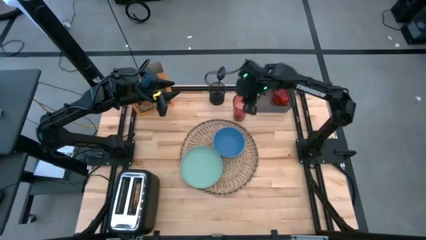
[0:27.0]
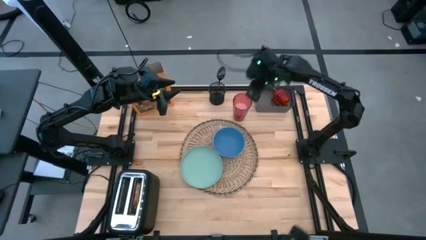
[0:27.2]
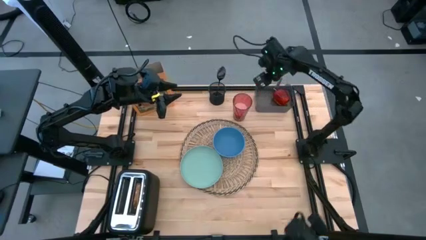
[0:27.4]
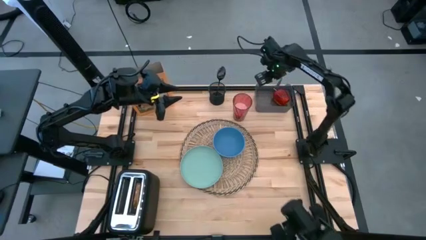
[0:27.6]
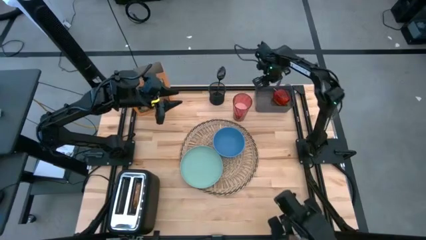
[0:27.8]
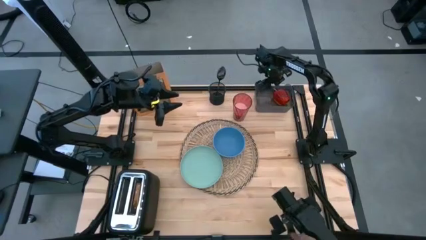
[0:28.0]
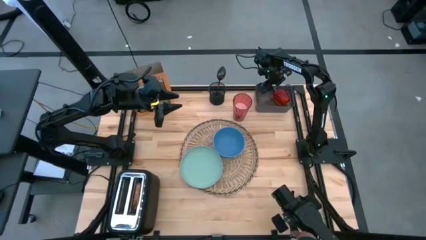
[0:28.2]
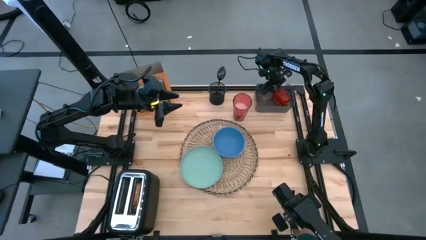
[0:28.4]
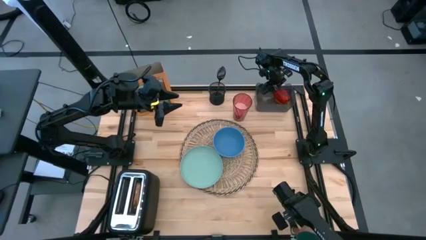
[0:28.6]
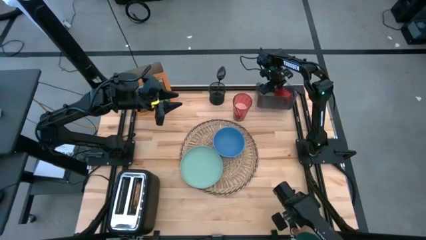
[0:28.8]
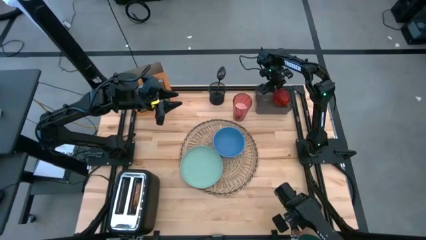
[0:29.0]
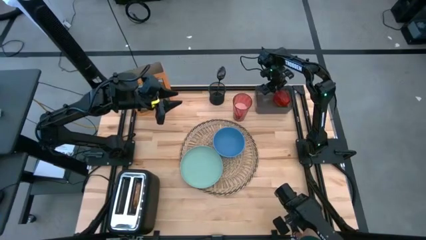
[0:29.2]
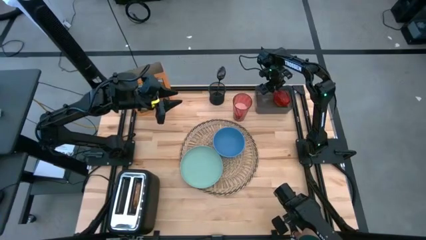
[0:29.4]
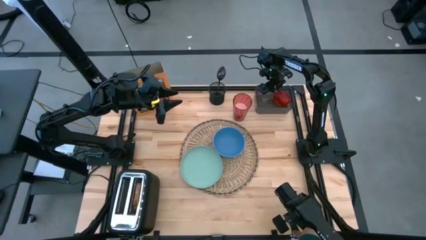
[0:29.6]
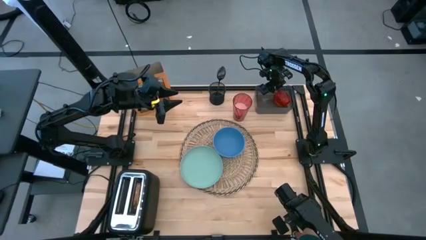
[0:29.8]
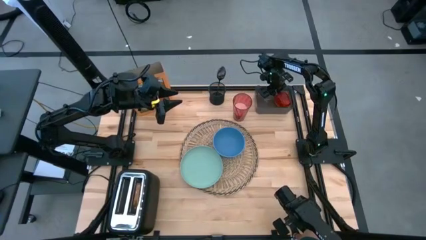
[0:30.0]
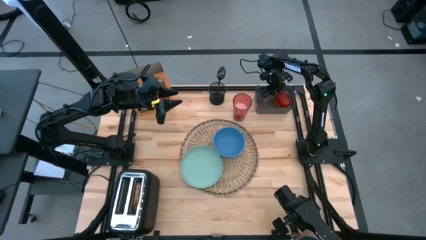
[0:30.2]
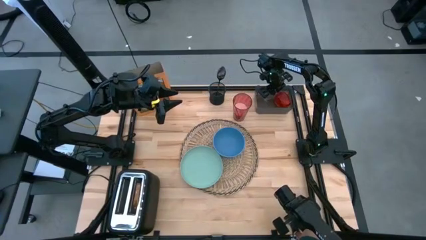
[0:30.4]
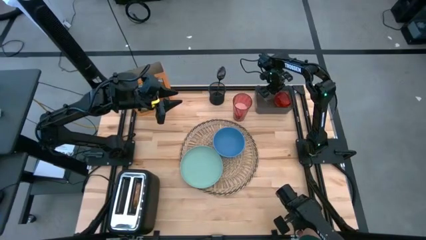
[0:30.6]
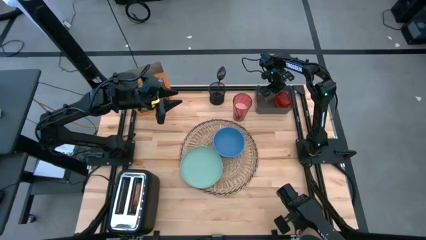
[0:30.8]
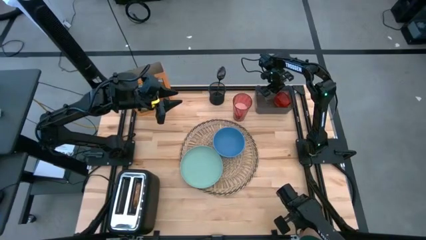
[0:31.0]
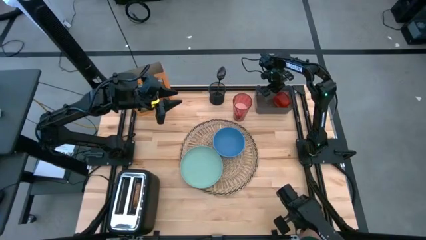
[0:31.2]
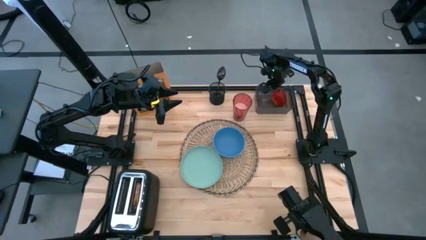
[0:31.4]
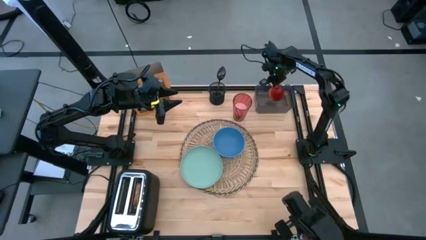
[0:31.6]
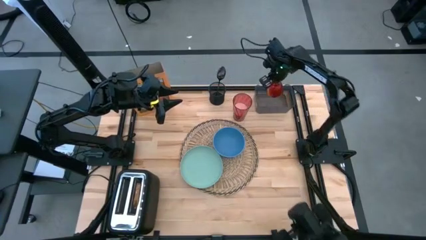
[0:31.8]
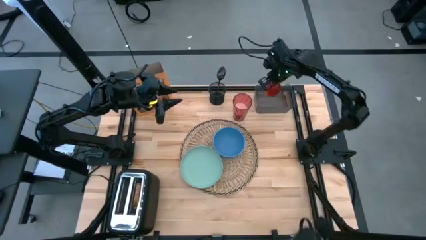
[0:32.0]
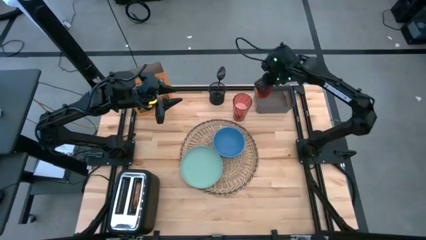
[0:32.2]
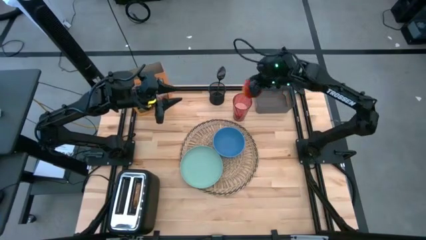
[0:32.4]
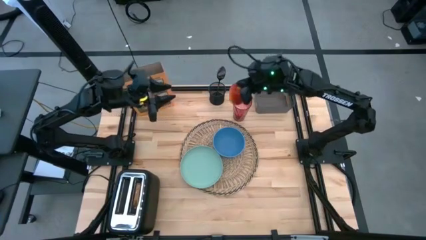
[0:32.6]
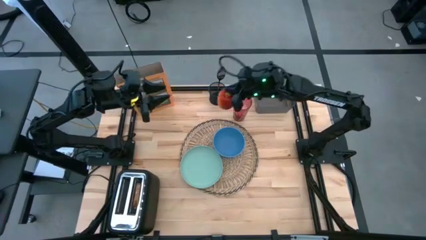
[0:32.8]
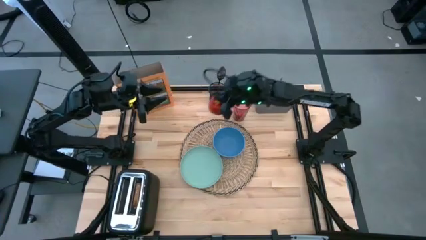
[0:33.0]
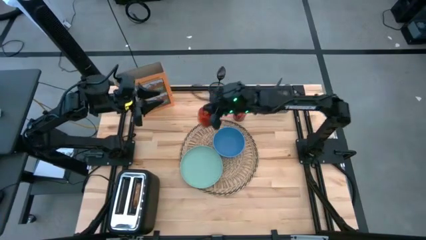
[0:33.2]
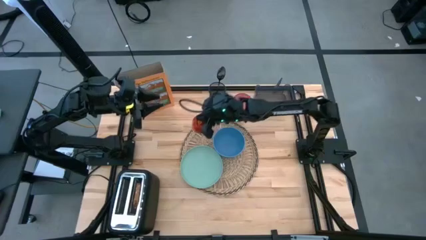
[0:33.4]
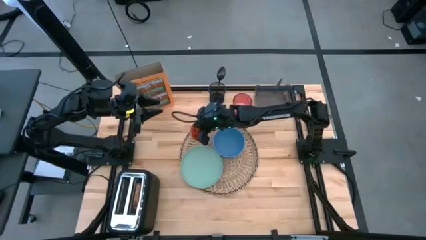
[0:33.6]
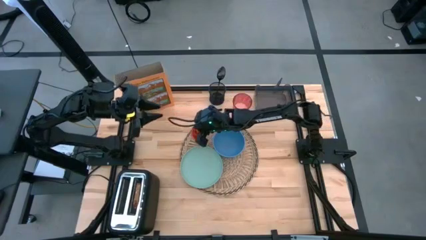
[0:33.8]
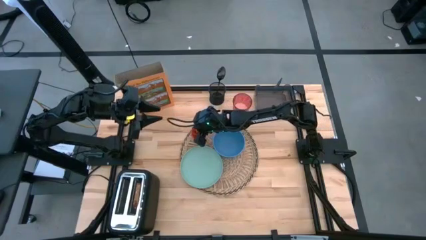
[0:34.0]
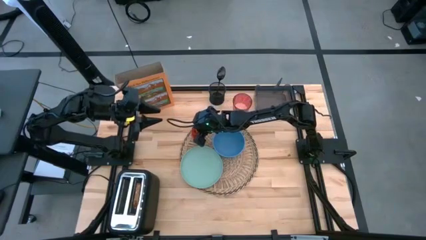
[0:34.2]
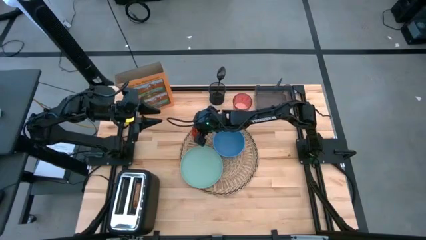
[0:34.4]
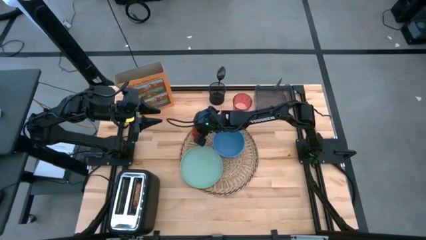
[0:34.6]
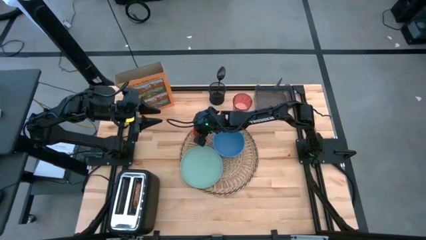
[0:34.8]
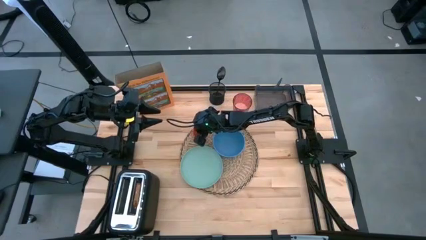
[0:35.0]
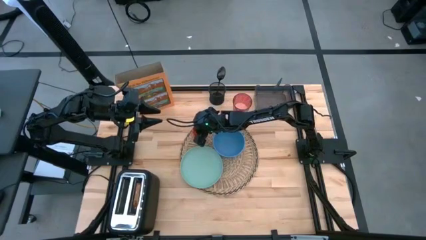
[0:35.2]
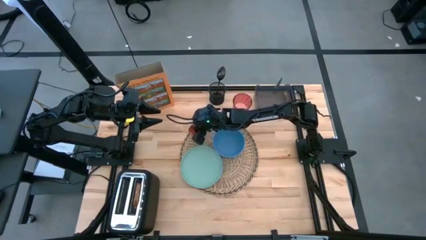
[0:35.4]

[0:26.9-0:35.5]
Task: Arrange a breakfast setting
Put the red apple on the brown table mat to the top of the light green plate

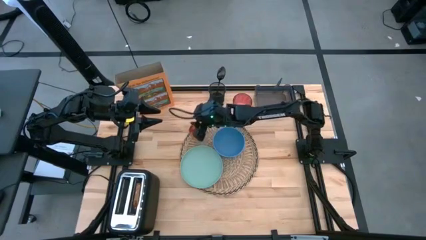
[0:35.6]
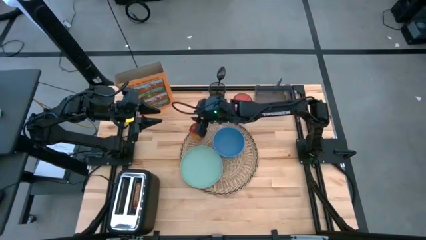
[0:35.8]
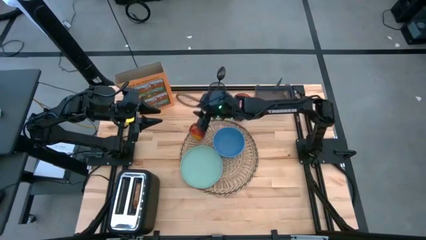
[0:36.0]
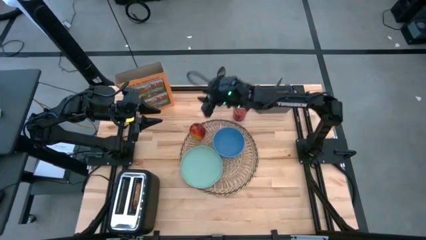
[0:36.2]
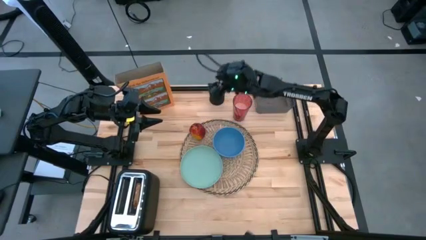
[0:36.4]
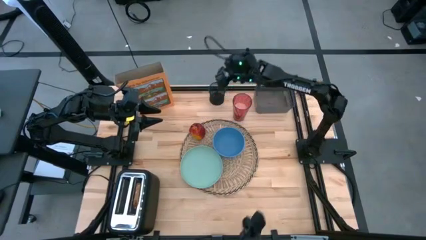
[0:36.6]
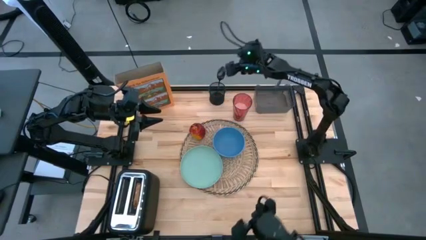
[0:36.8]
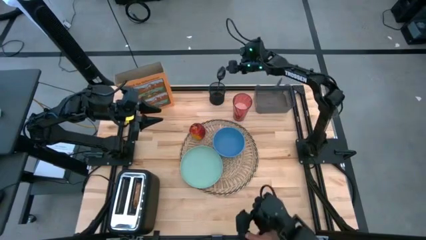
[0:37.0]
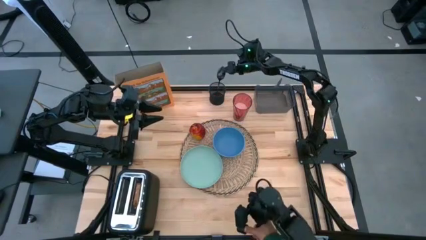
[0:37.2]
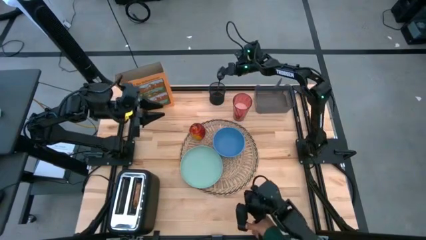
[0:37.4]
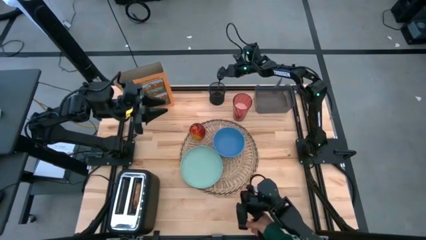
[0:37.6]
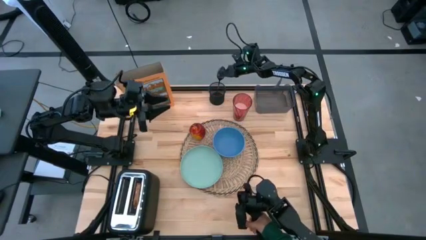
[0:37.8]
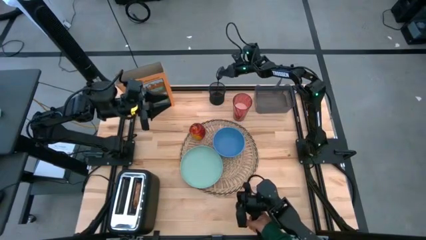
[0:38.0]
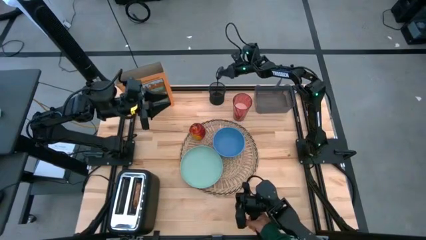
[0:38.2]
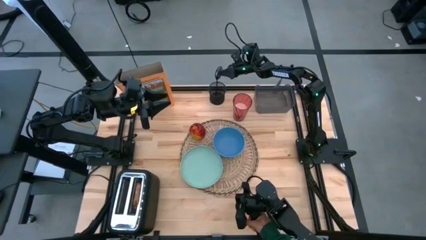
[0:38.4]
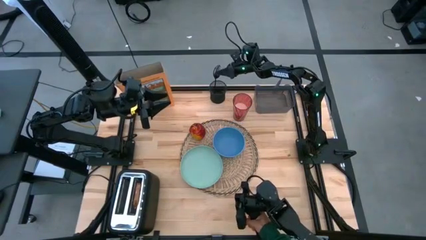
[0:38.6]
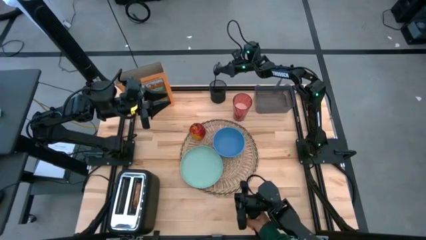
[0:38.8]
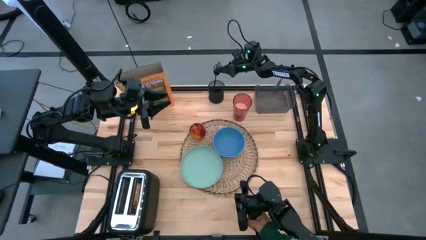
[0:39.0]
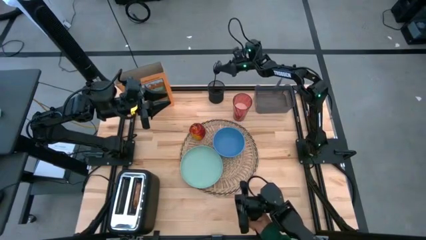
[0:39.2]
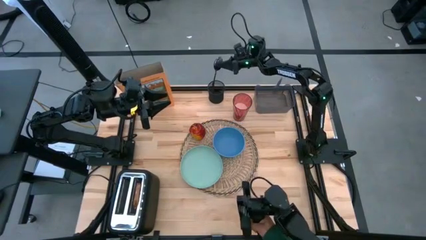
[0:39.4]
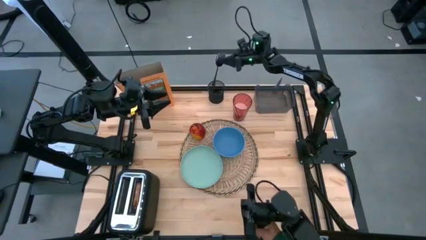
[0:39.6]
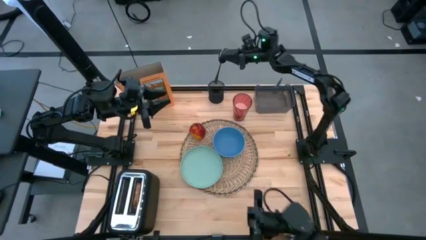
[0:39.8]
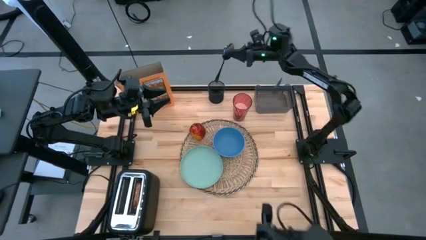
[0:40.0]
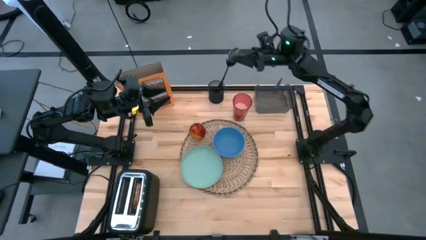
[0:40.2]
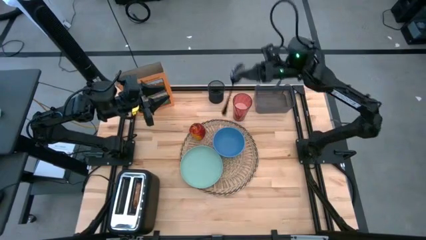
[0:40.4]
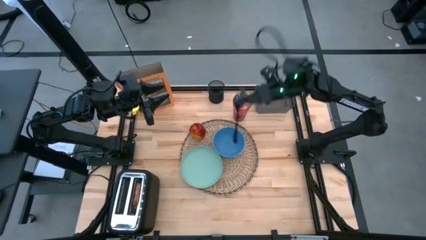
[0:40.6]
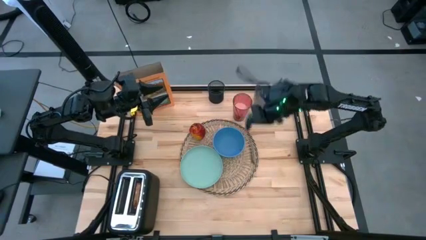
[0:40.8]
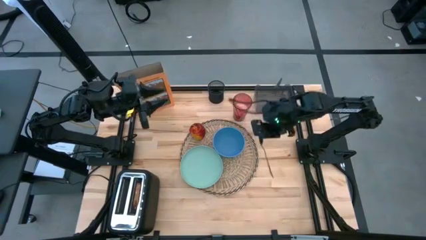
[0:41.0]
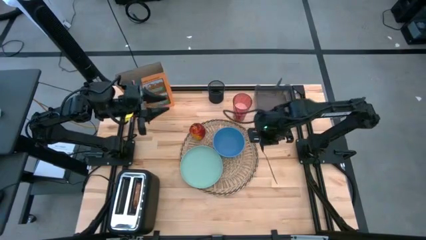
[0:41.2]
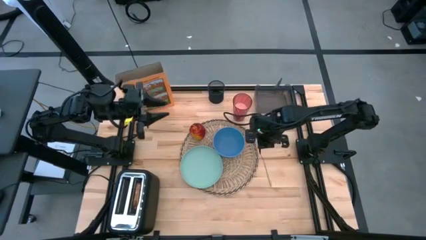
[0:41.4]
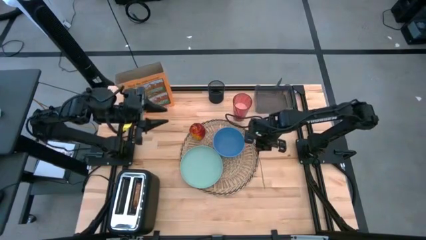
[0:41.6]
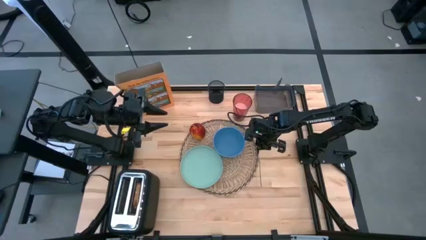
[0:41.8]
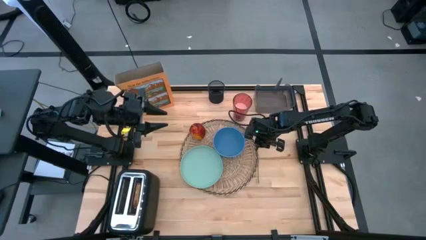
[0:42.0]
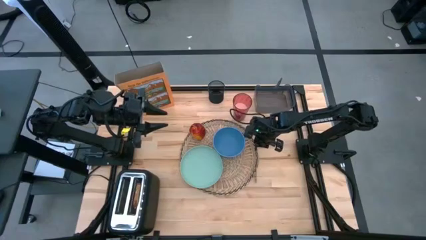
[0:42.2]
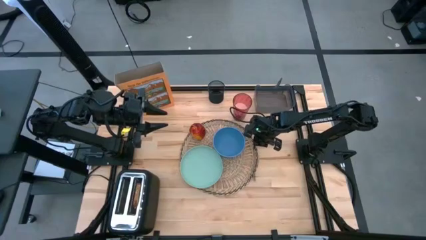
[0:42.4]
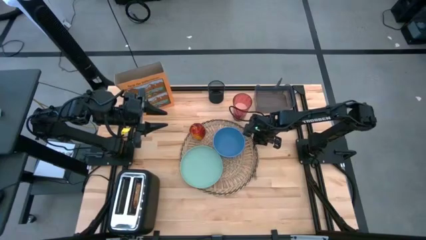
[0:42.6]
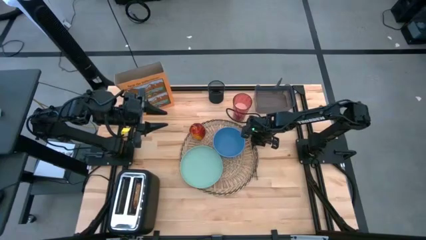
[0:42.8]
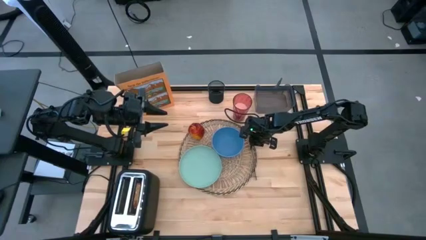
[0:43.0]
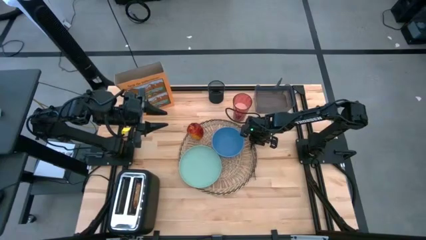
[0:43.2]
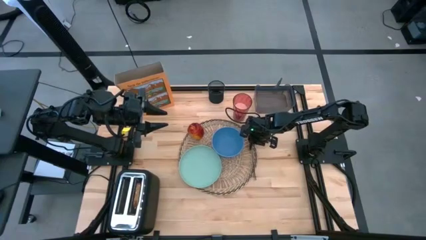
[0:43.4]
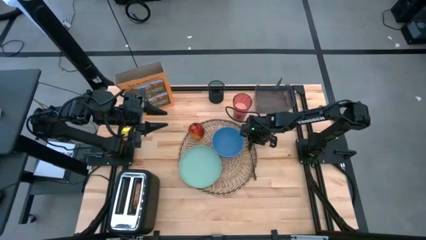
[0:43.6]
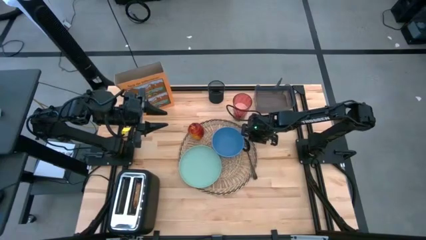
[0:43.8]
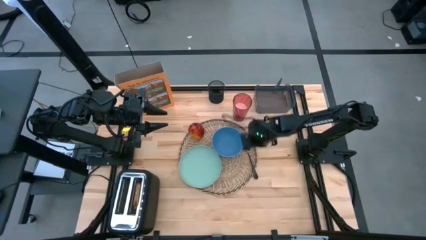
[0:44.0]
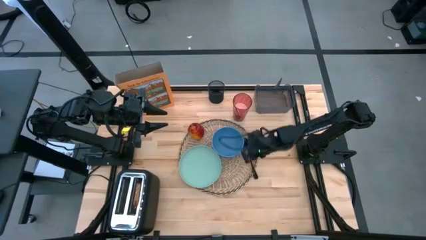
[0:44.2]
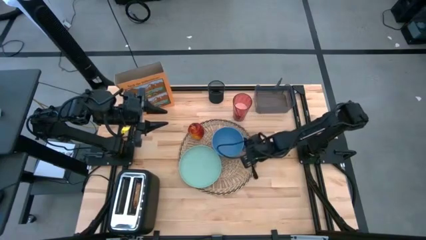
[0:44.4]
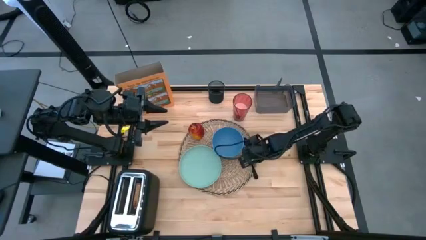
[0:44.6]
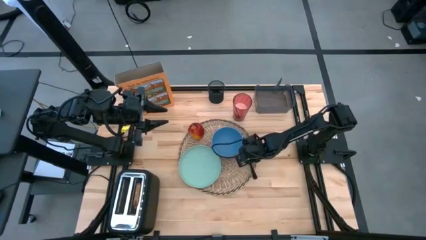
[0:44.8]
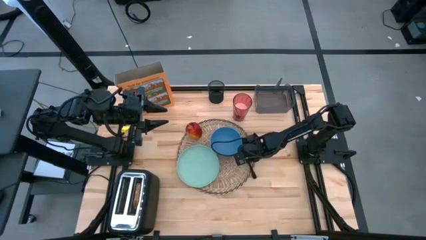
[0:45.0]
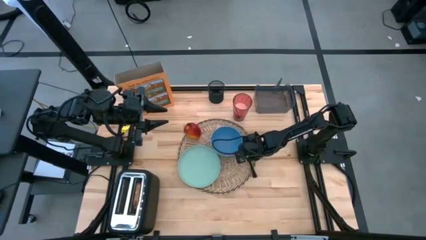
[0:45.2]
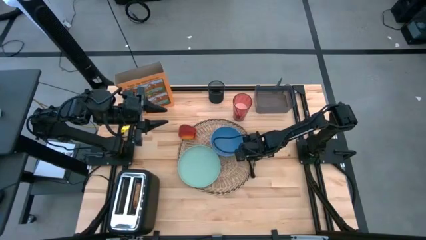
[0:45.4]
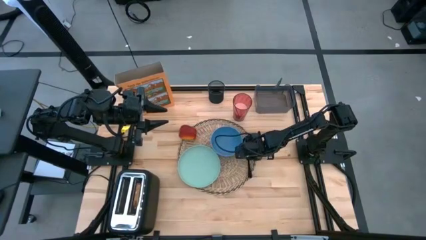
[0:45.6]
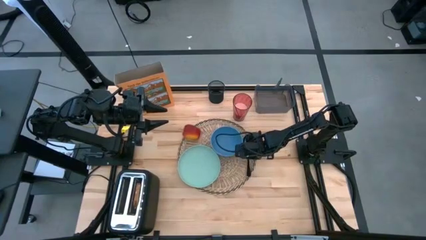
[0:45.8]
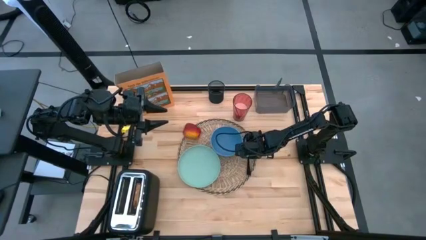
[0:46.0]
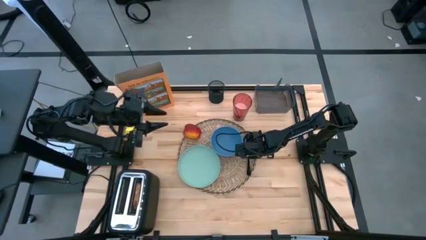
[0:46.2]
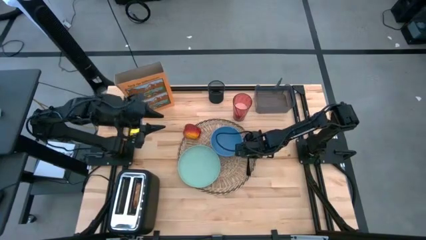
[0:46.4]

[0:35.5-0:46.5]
Put the black spoon on the brown table mat to the right side of the blue bowl
